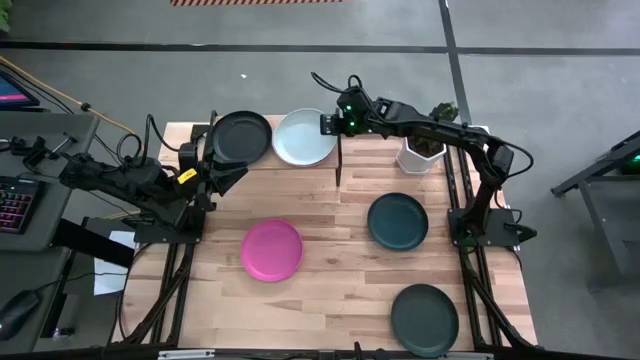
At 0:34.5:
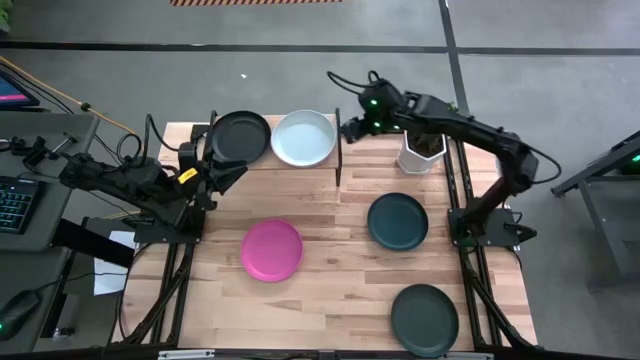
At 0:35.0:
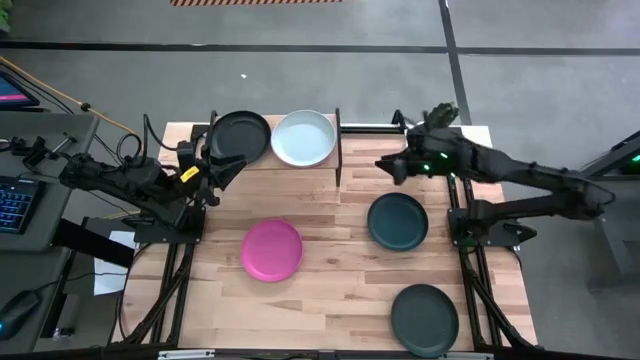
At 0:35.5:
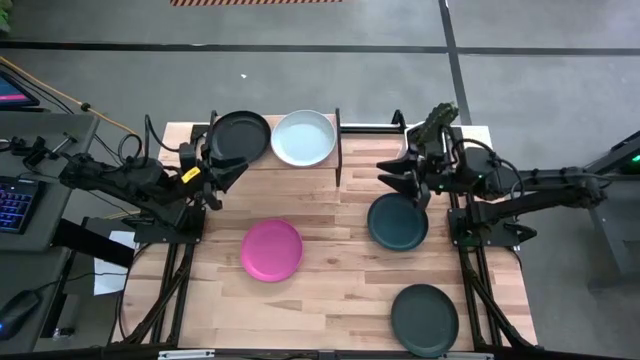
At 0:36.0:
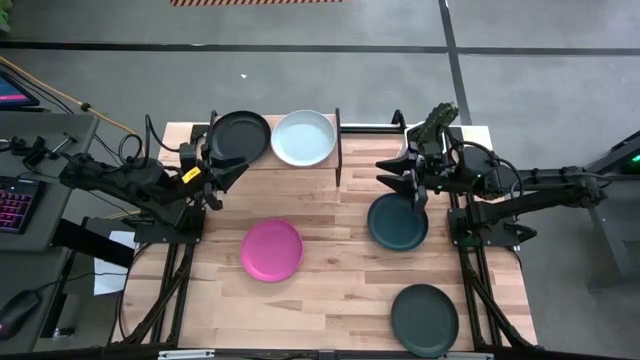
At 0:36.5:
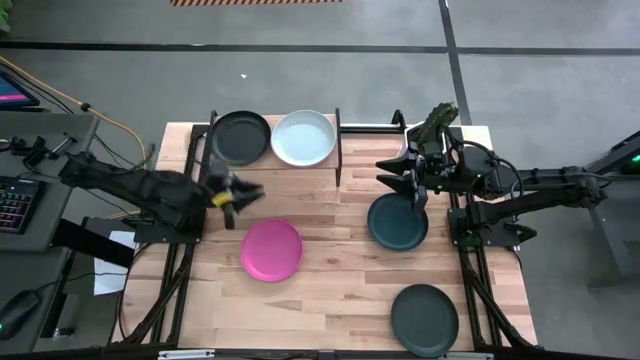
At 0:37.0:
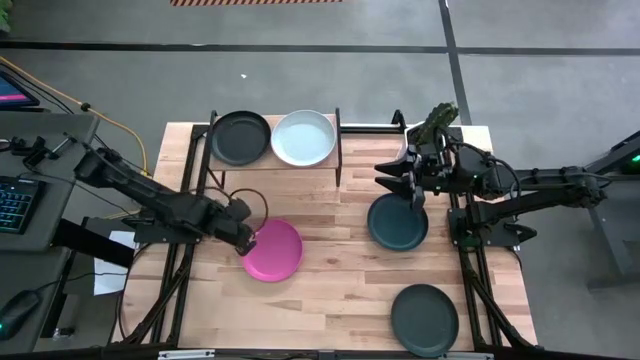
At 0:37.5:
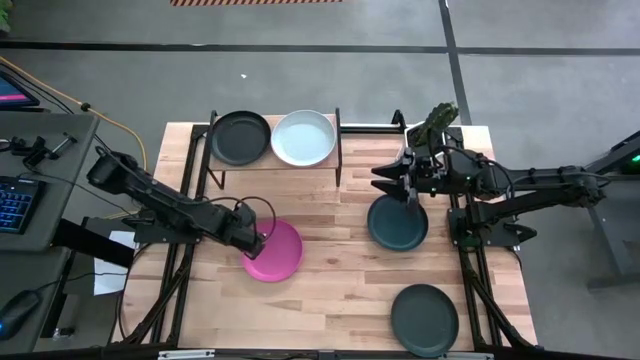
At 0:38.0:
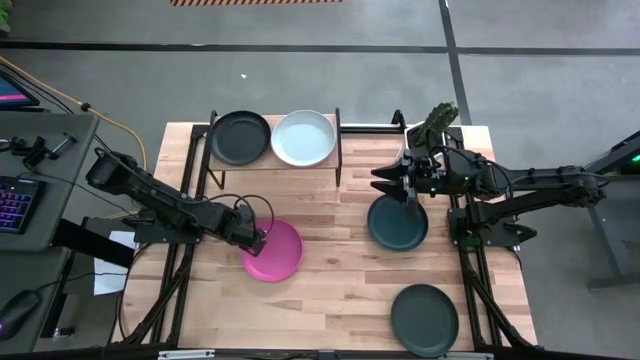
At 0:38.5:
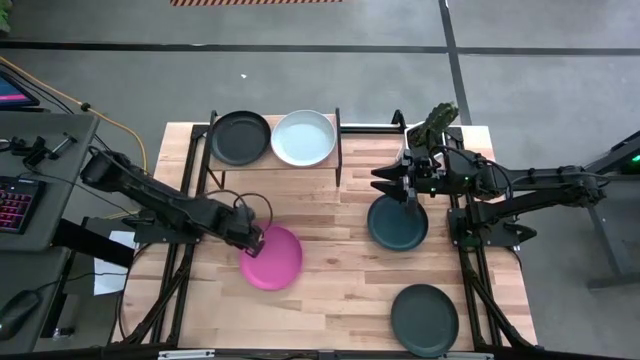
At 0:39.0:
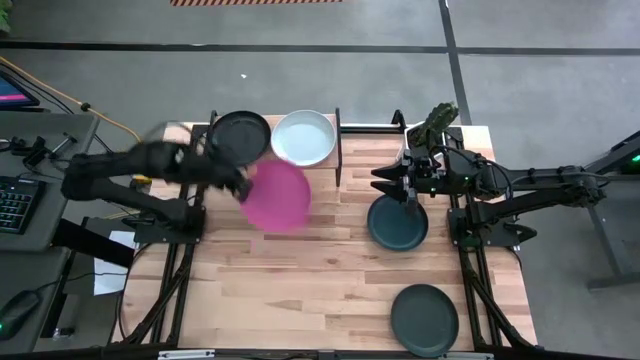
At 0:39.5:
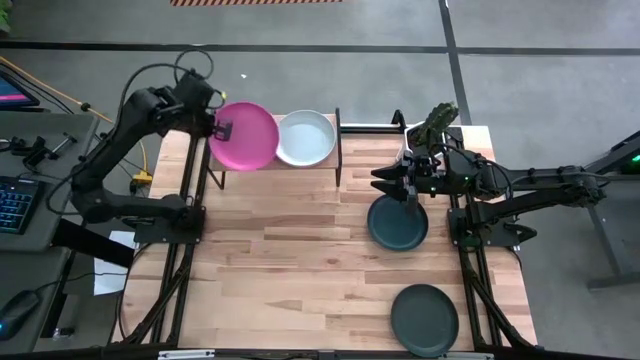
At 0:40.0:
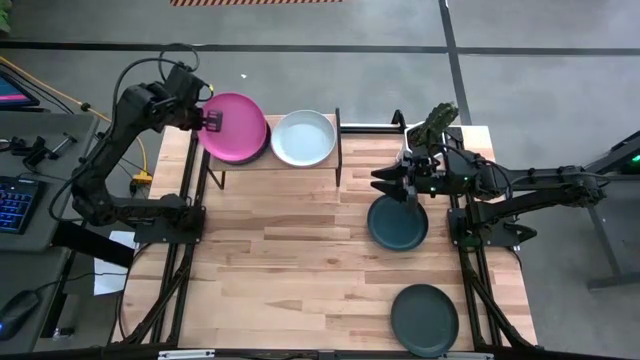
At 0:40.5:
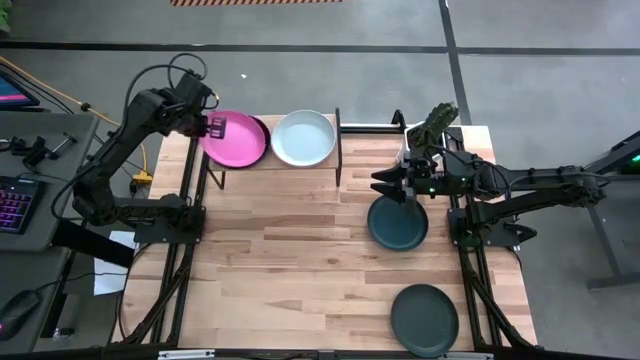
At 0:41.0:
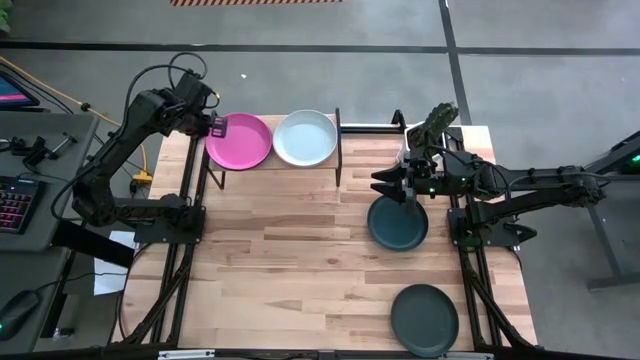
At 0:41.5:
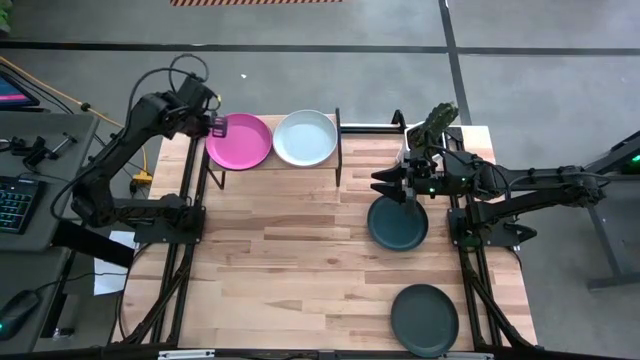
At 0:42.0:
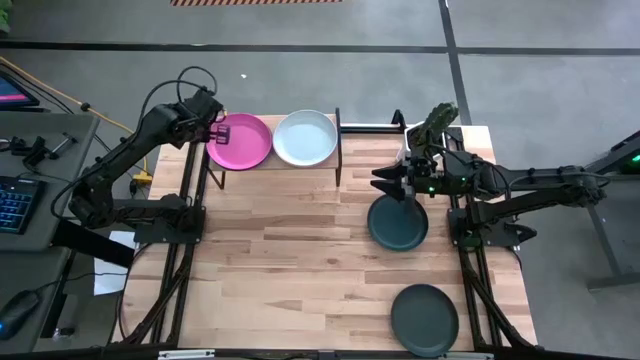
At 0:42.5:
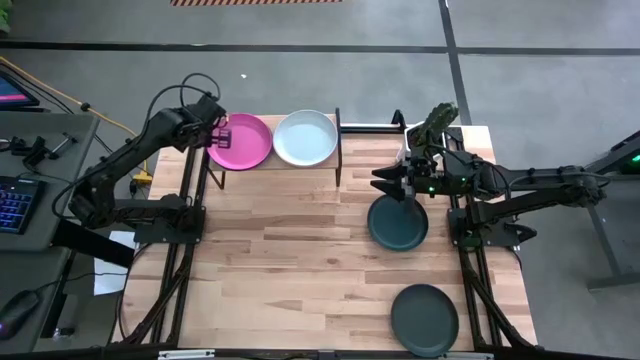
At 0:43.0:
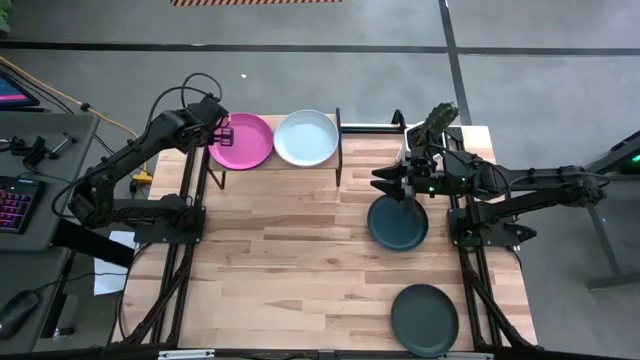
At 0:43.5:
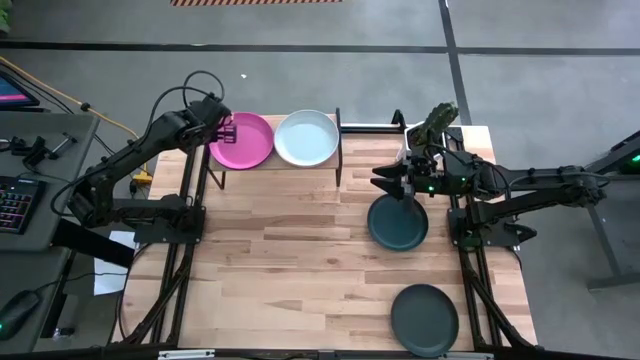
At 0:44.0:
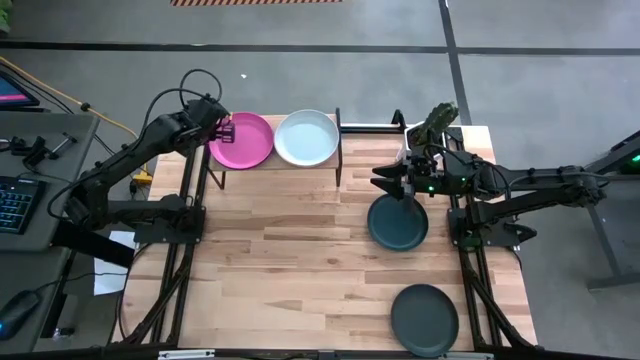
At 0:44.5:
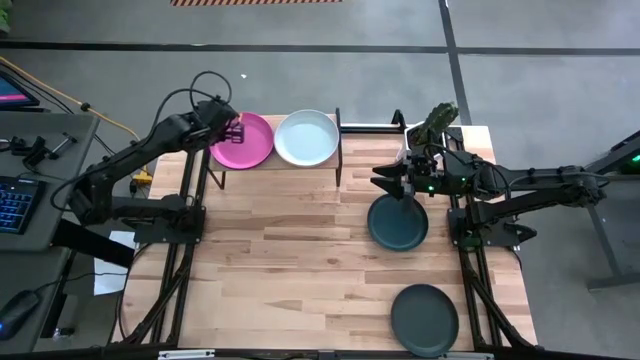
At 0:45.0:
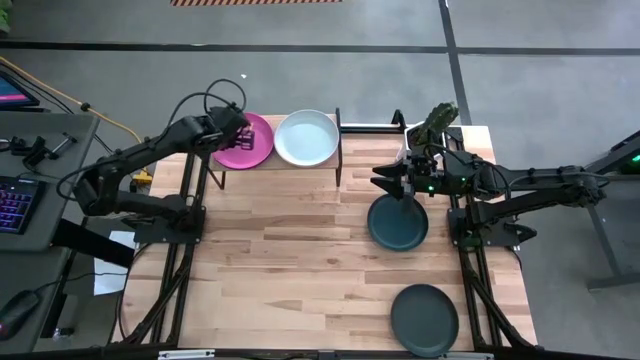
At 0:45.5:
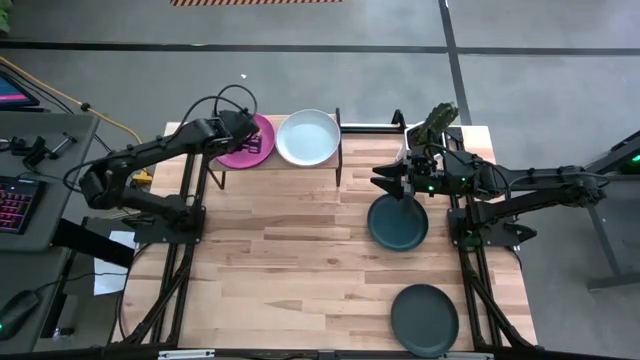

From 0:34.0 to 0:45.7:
Task: Place and stack plates onto a shelf
Stack the pink plate on the top of the black plate on the shelf

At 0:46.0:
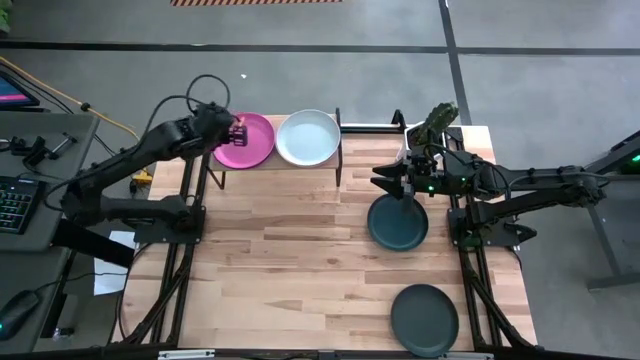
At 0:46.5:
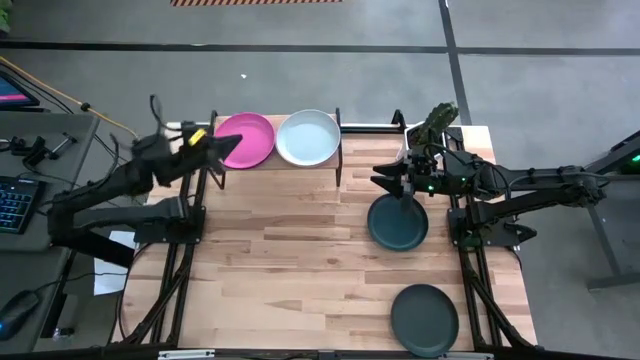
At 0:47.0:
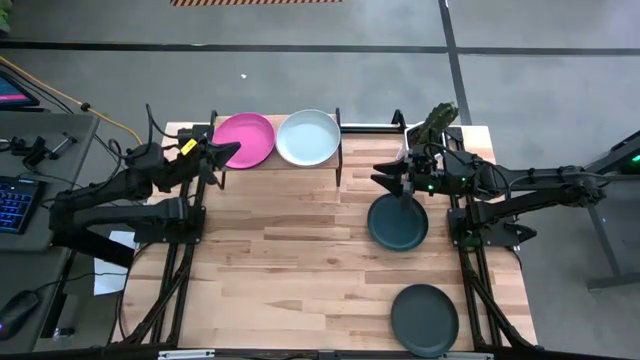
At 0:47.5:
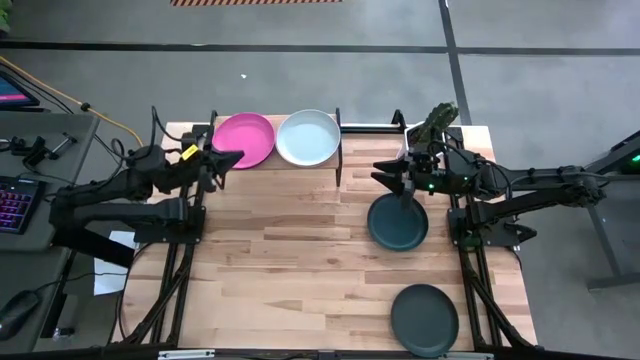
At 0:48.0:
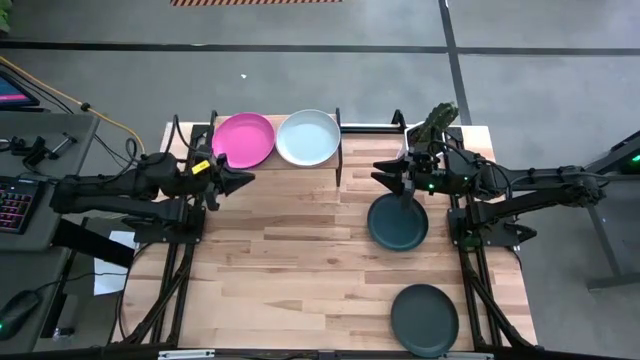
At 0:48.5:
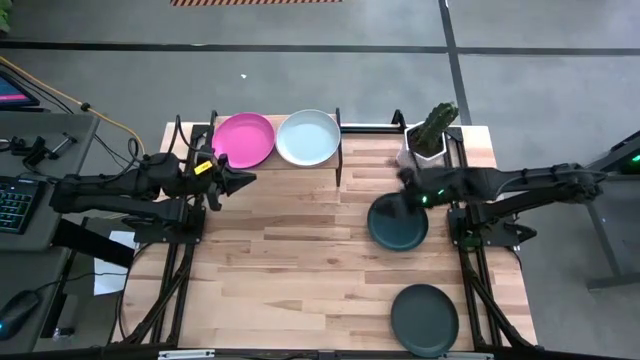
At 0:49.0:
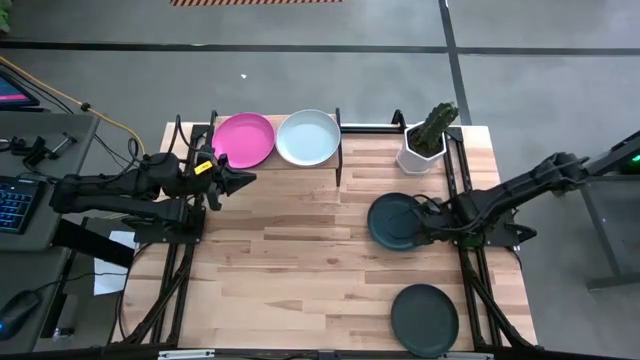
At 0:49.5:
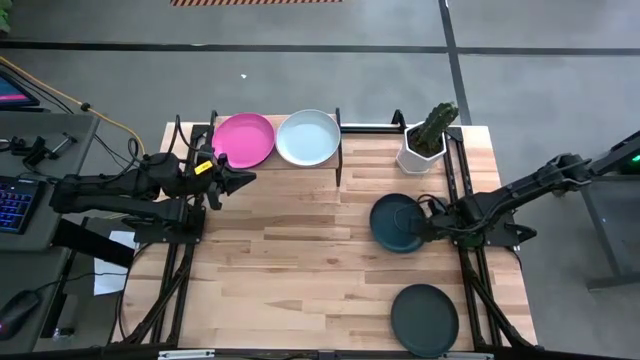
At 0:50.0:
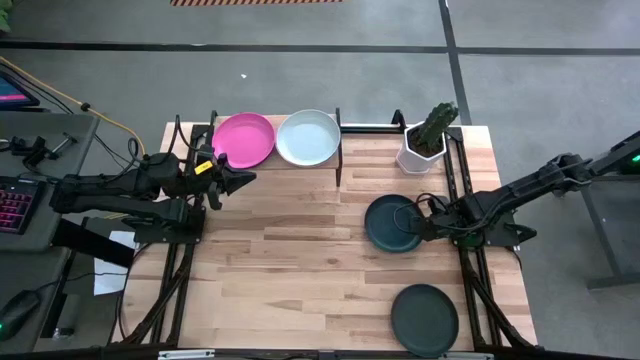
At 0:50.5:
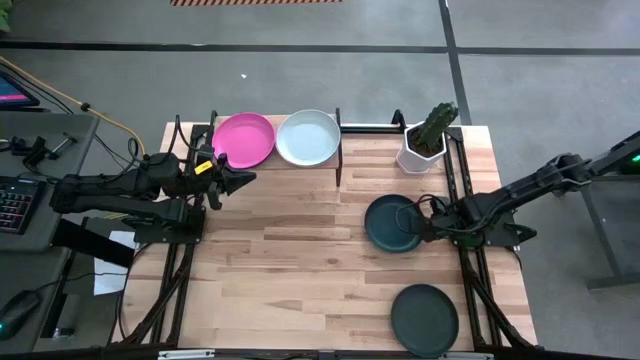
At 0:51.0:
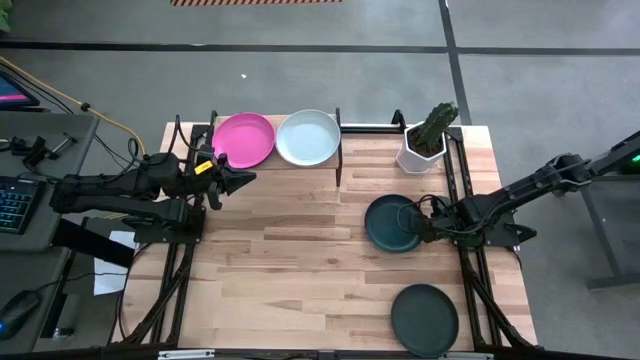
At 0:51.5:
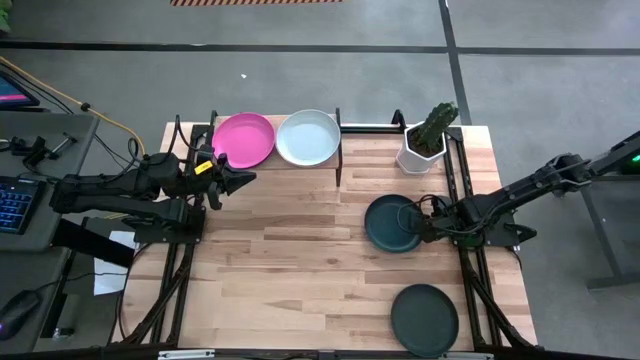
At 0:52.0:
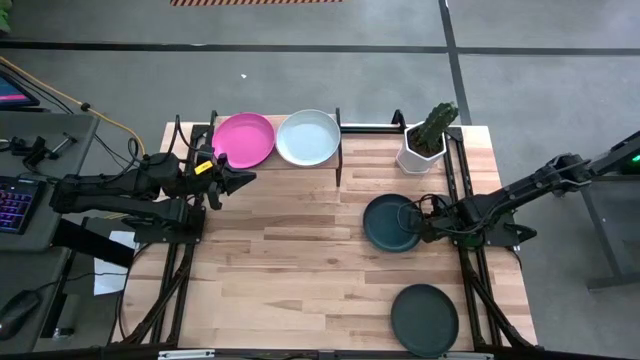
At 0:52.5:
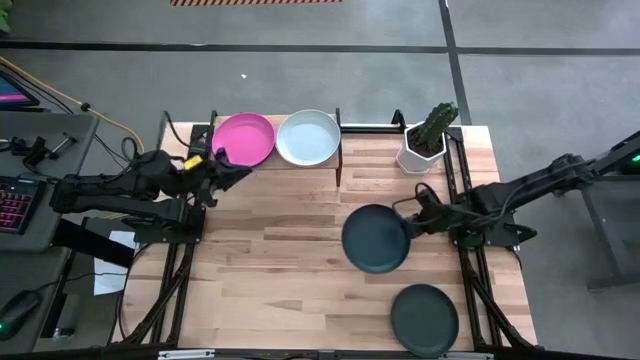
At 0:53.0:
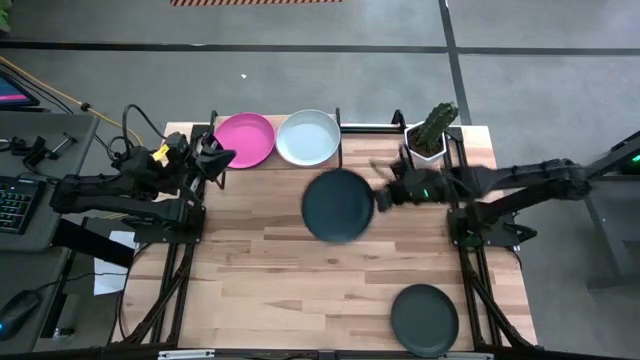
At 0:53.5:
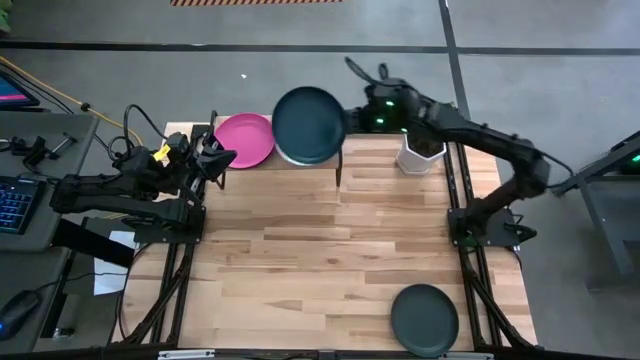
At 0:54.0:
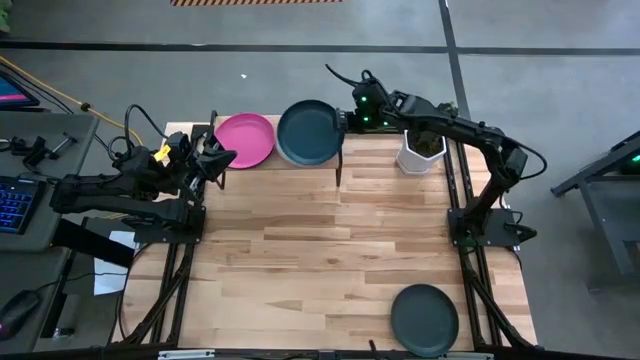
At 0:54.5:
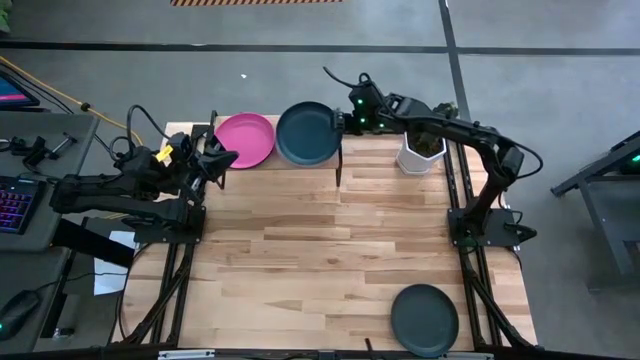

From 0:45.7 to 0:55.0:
Stack the dark green plate on the top of the white plate on the shelf
